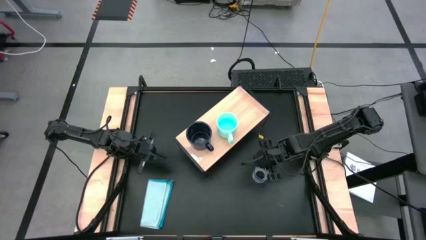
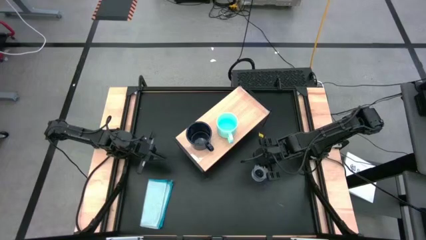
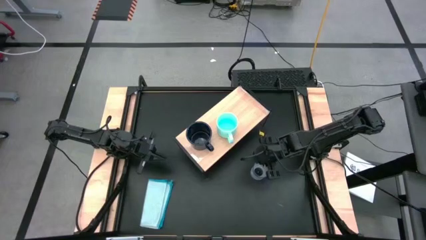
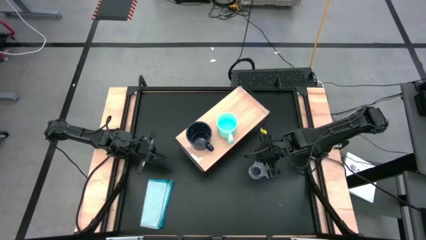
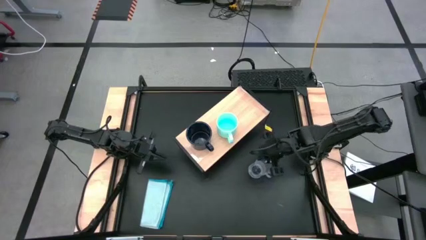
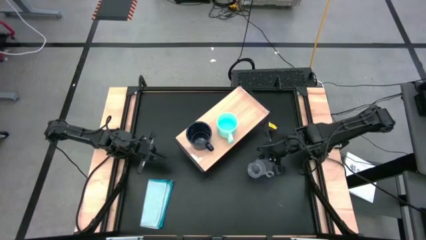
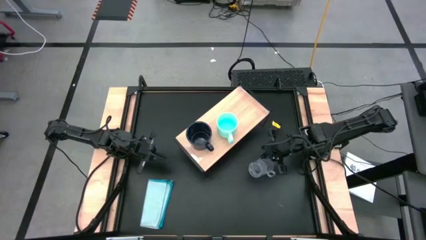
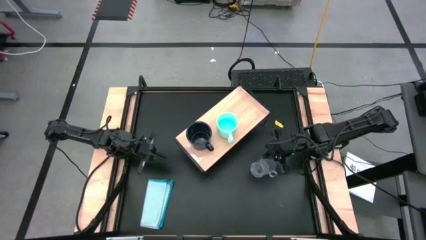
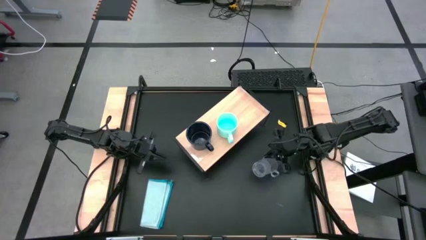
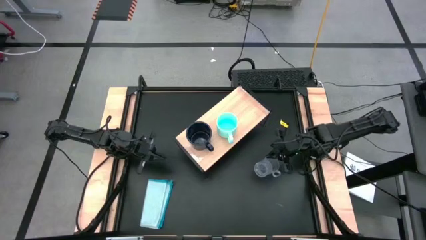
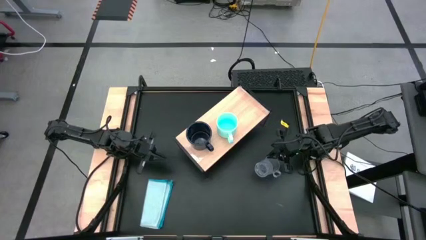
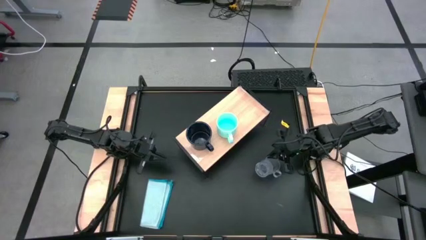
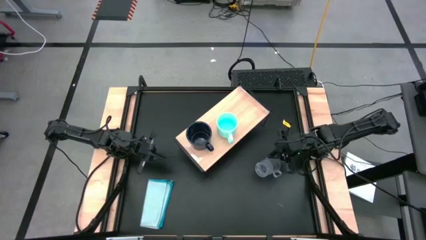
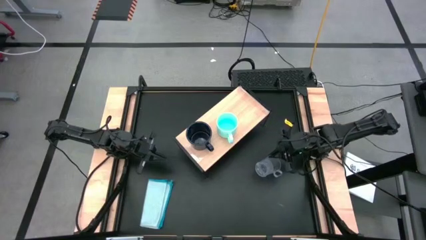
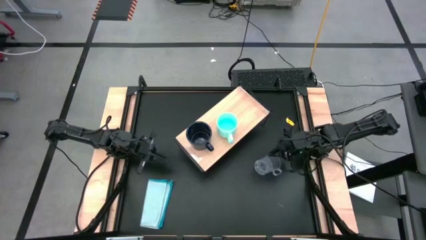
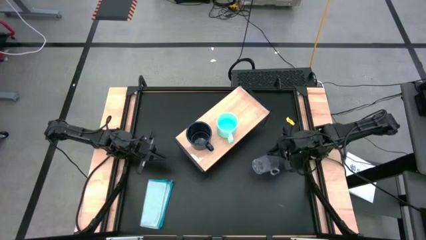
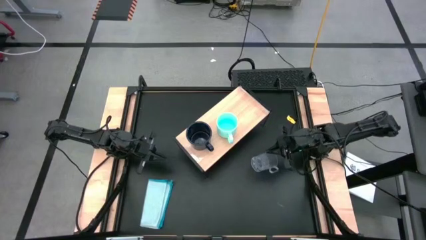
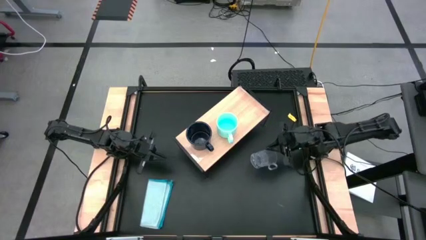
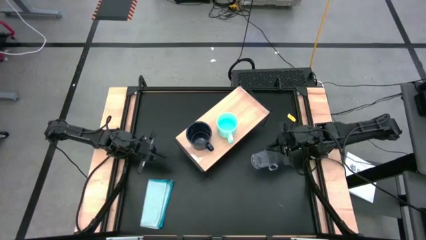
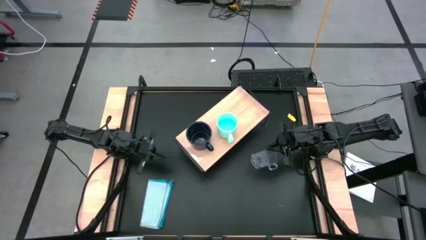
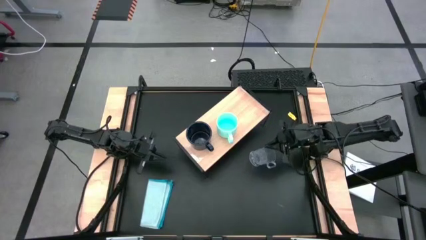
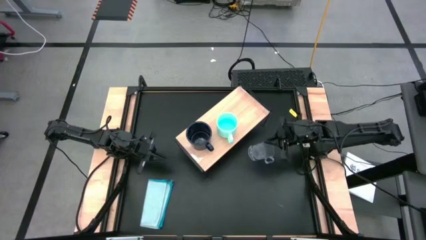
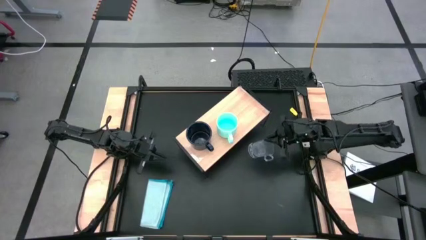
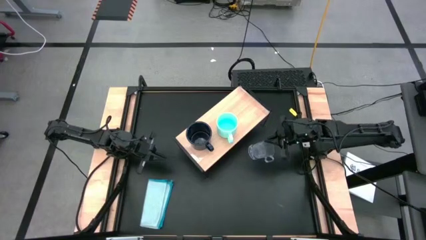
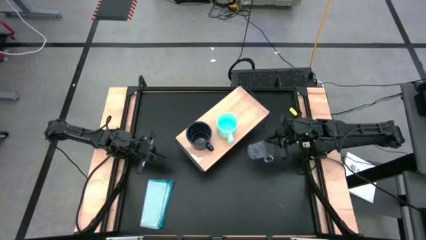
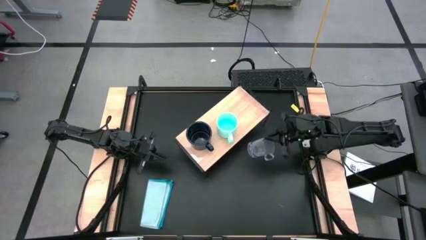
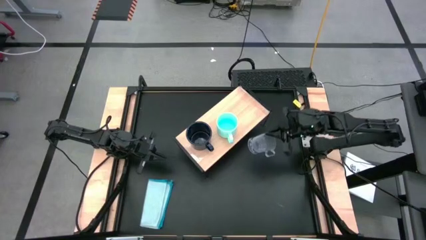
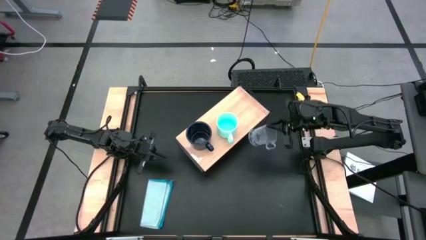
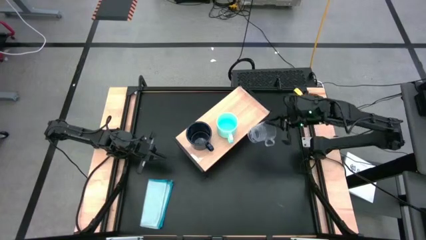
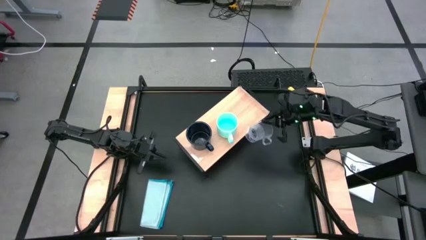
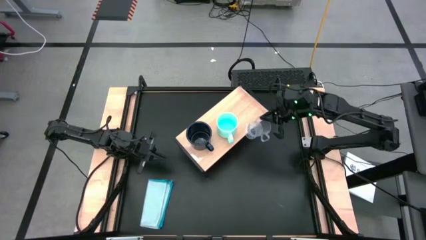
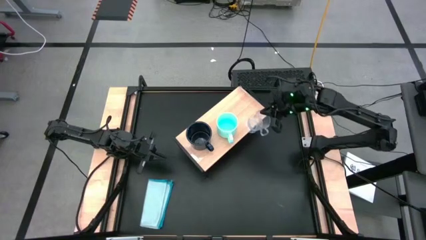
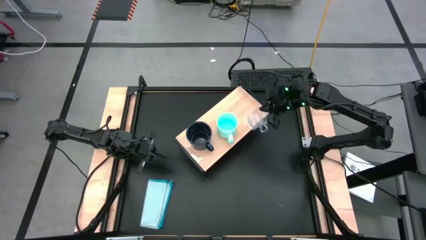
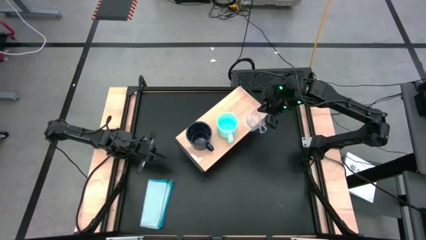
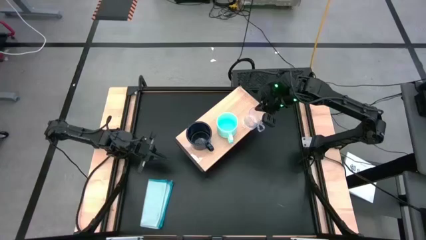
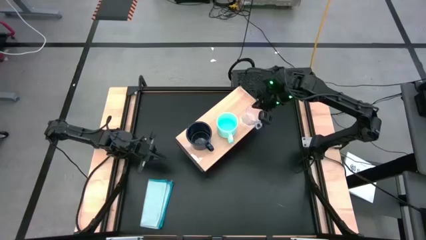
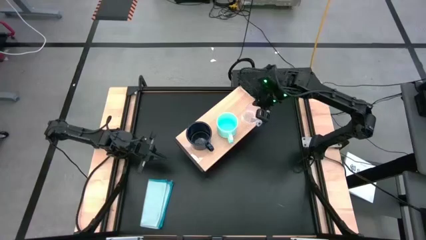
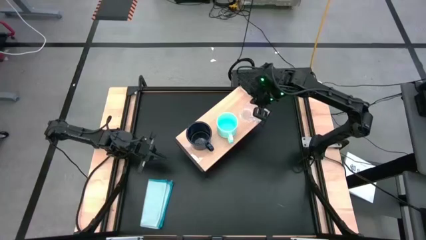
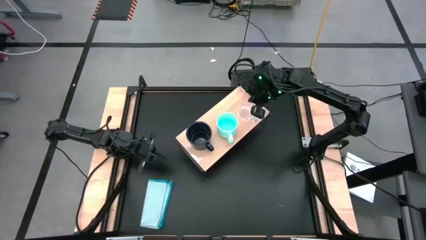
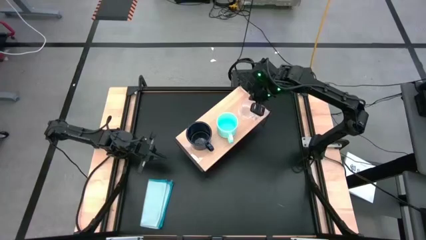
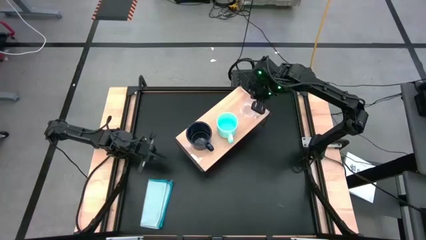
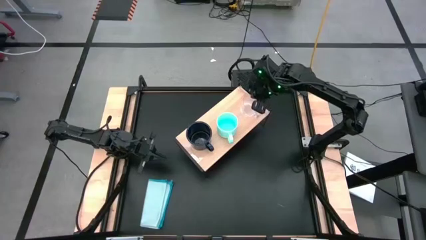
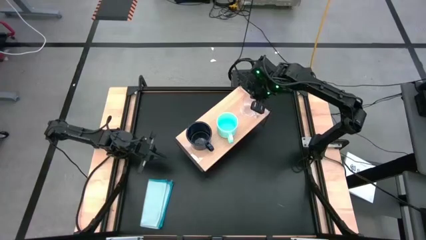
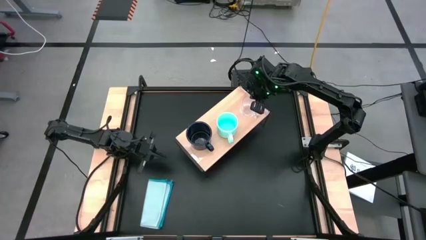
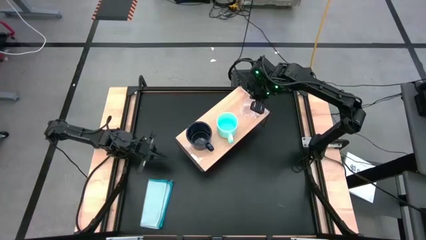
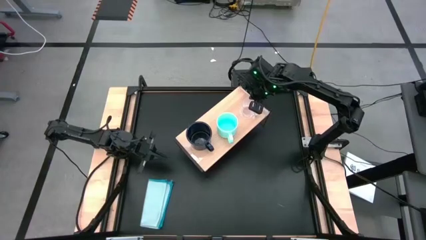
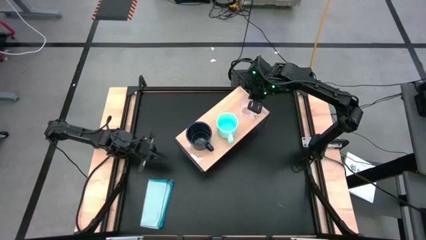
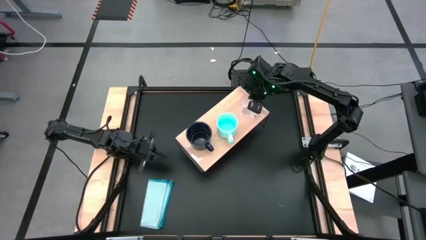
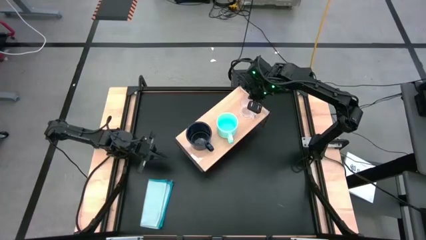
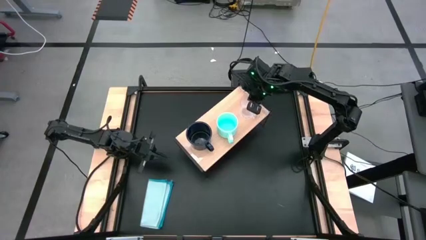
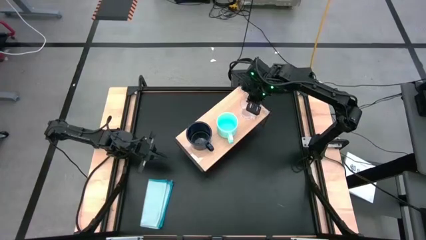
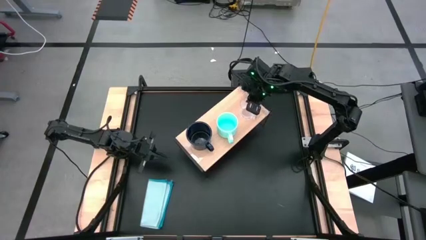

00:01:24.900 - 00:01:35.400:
Task: Stack small to large cups/mugs on shelf
Put the transparent cup on the shelf

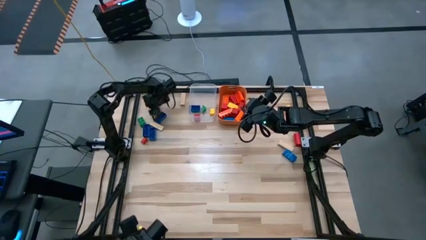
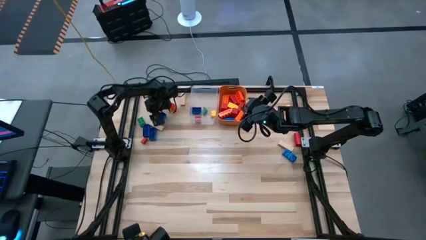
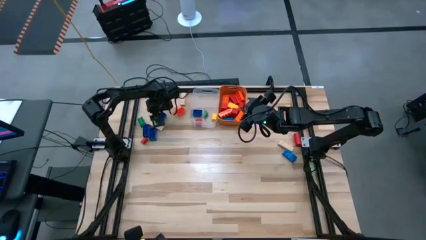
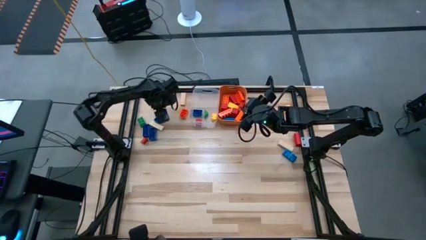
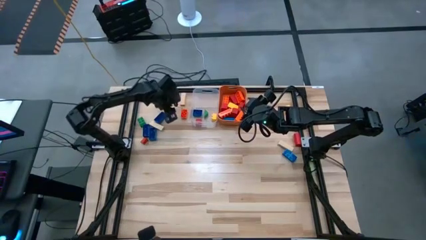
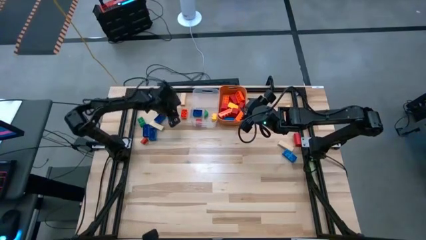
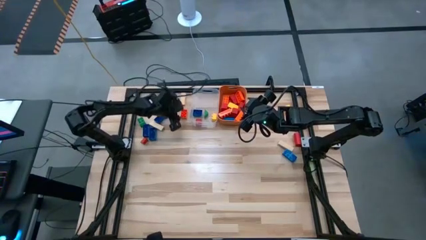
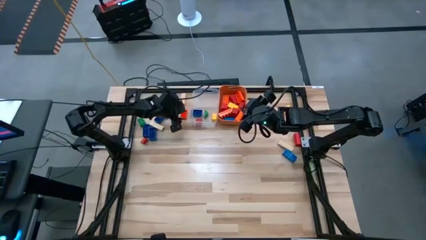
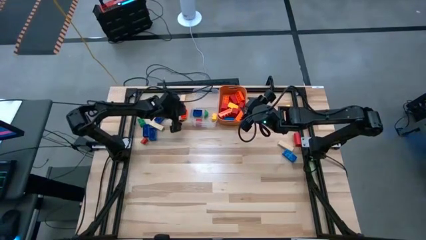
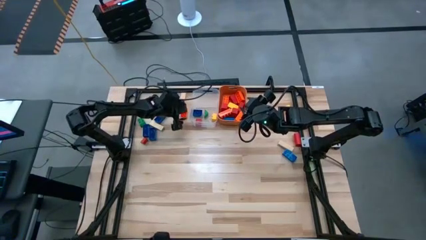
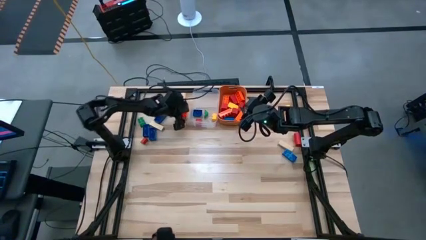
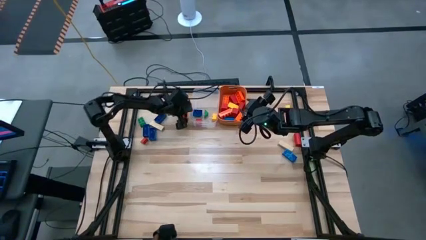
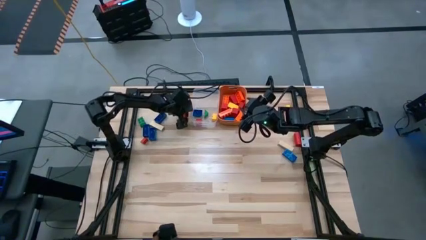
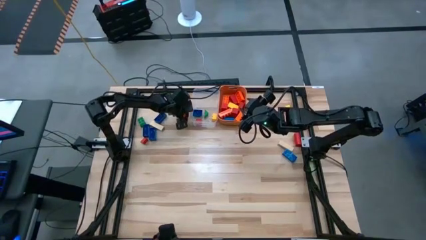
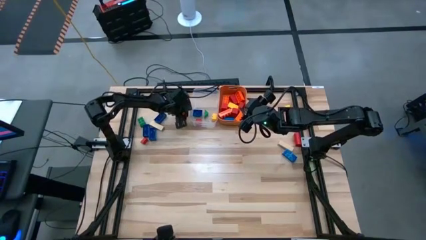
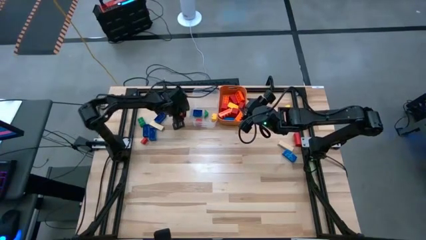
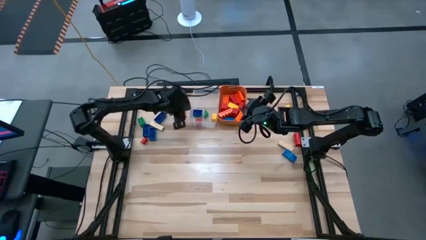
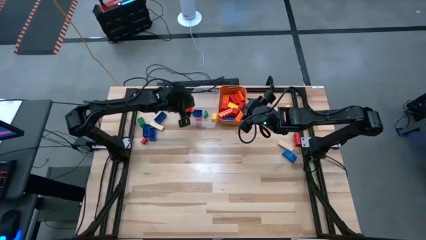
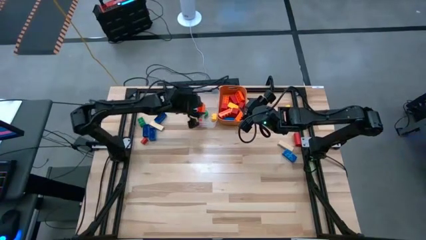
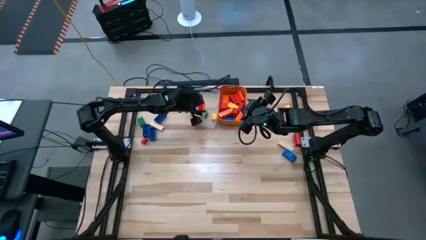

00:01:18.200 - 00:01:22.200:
Task: Sort blocks by size
Put the orange rectangle game piece into the orange bin

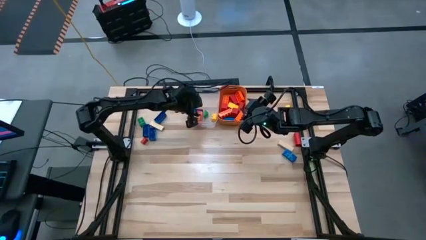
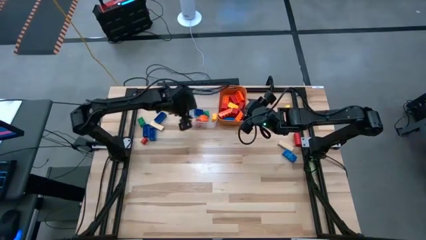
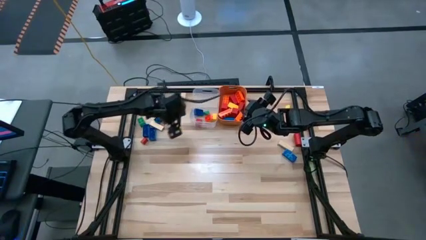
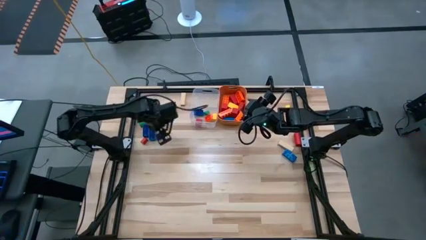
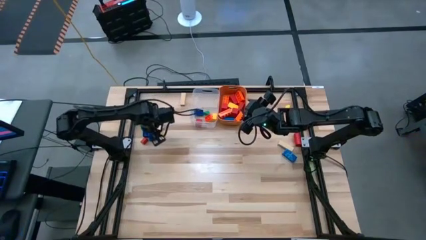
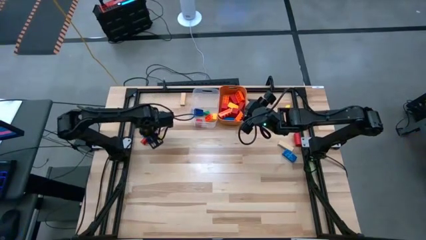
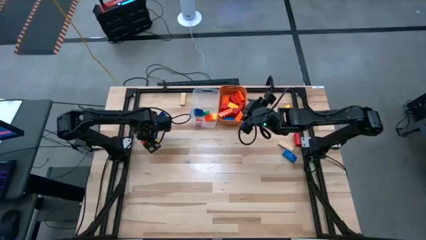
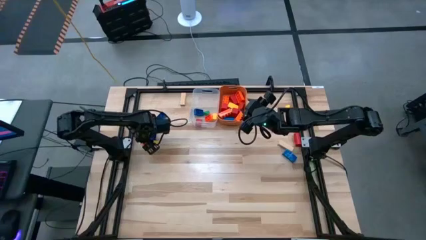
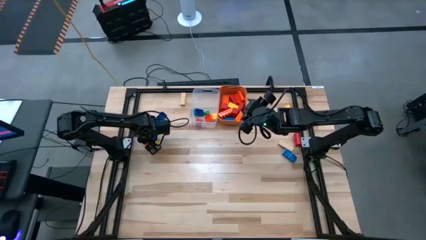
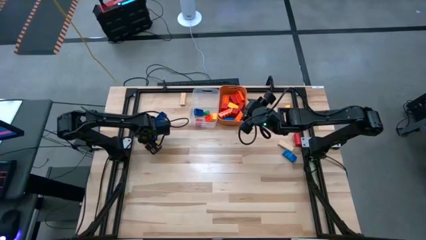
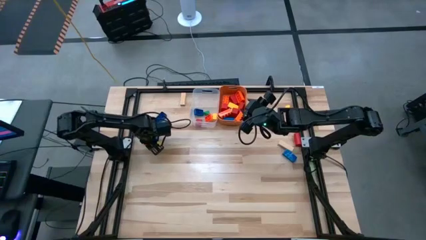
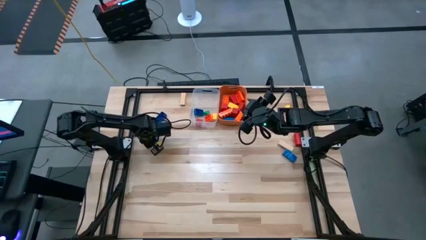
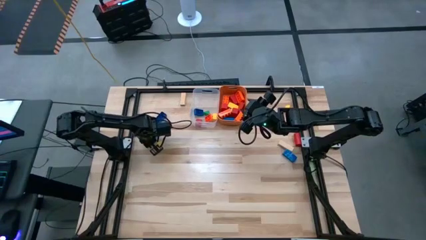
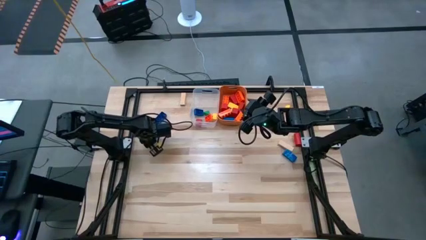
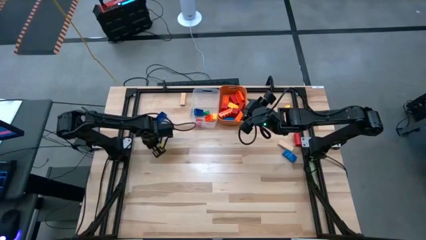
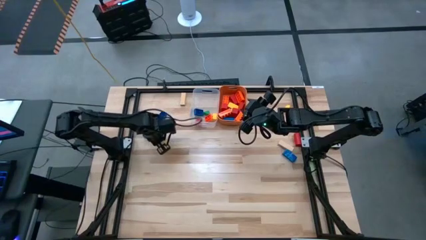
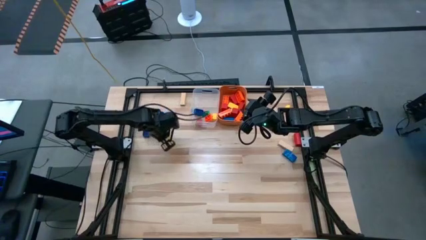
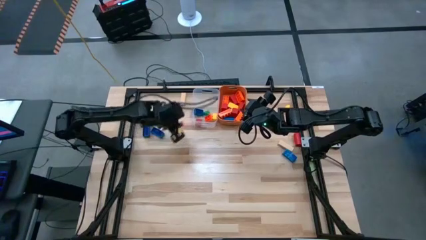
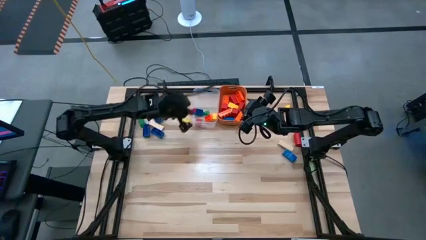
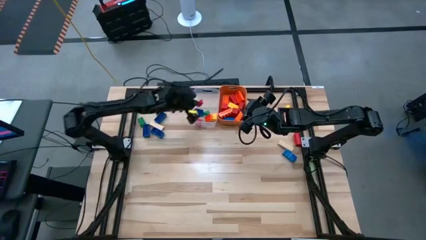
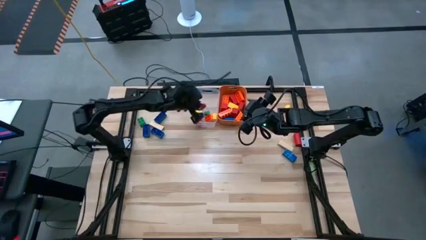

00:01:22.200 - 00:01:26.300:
Put the red triangle block into the clear bin
